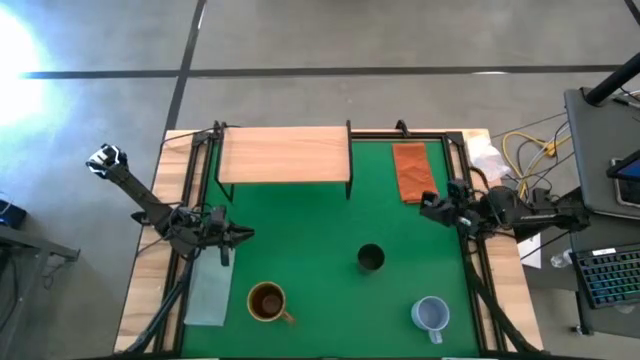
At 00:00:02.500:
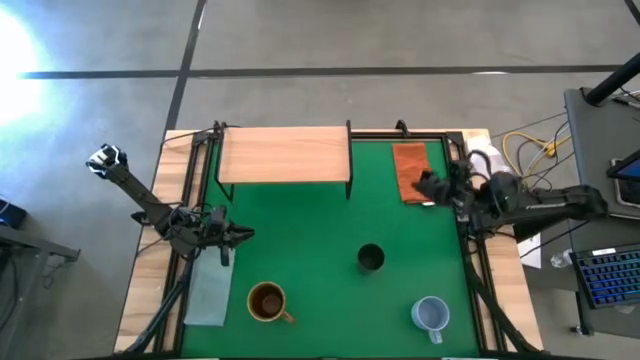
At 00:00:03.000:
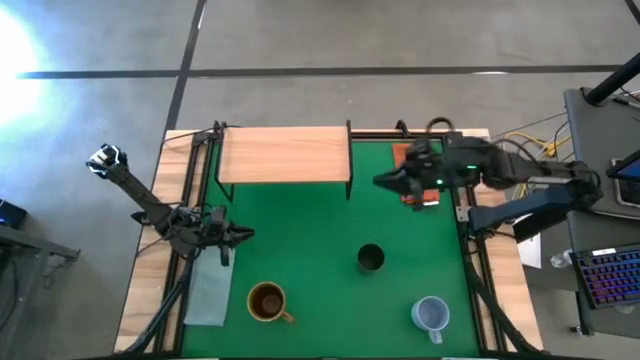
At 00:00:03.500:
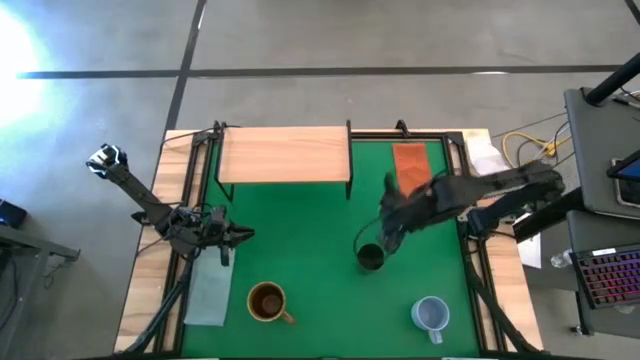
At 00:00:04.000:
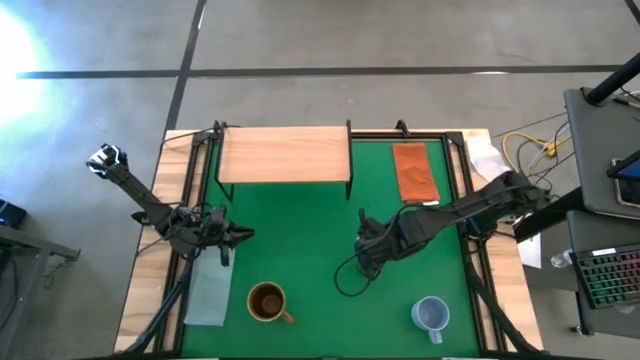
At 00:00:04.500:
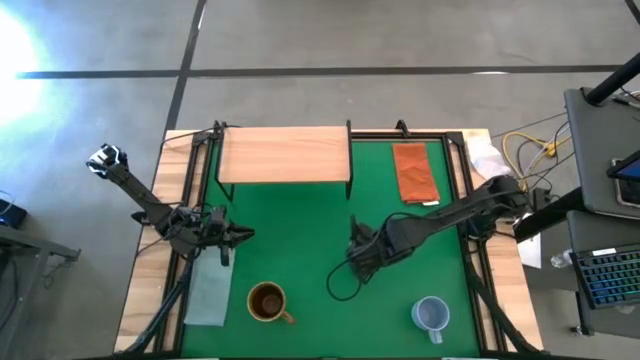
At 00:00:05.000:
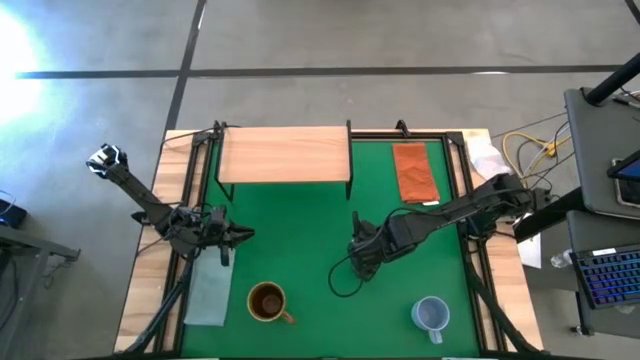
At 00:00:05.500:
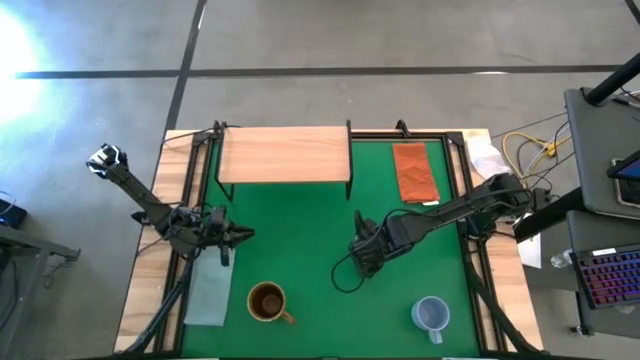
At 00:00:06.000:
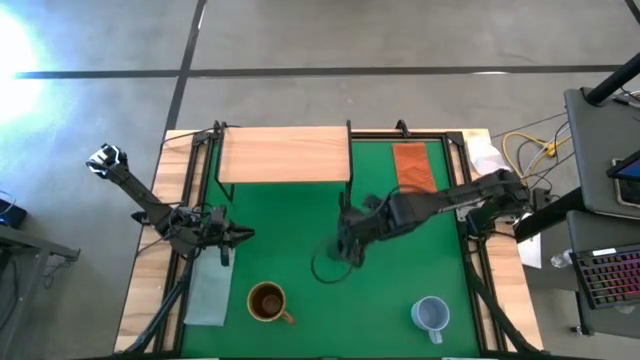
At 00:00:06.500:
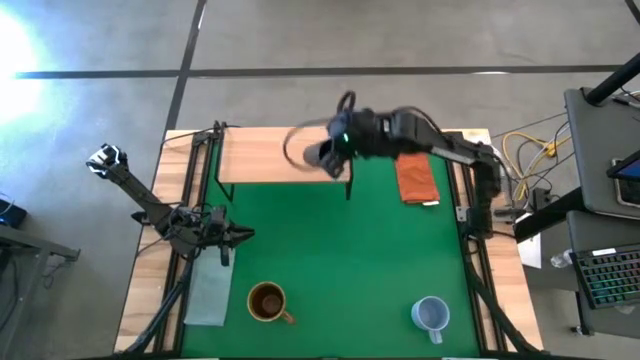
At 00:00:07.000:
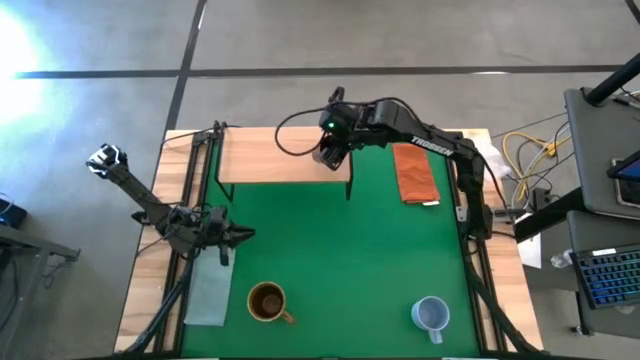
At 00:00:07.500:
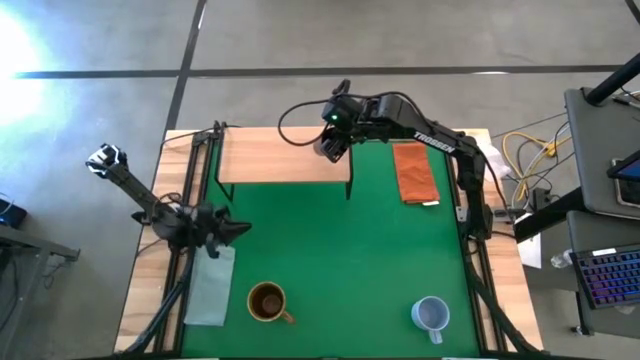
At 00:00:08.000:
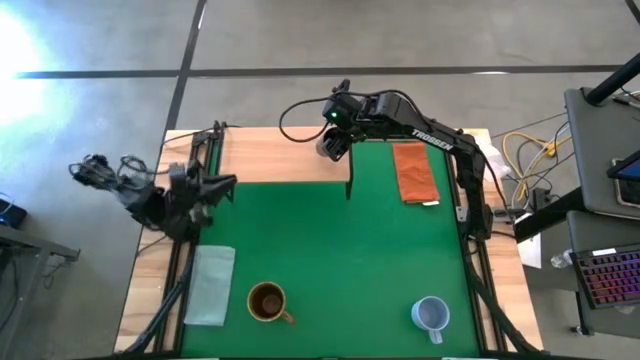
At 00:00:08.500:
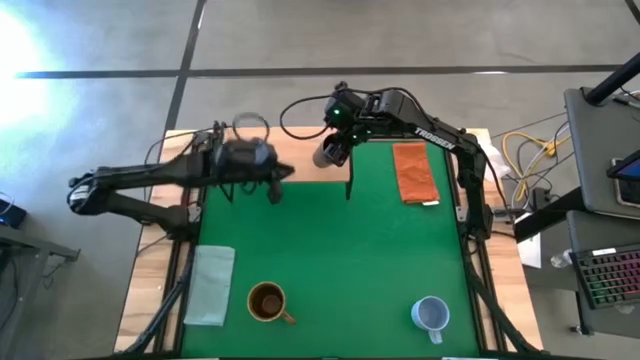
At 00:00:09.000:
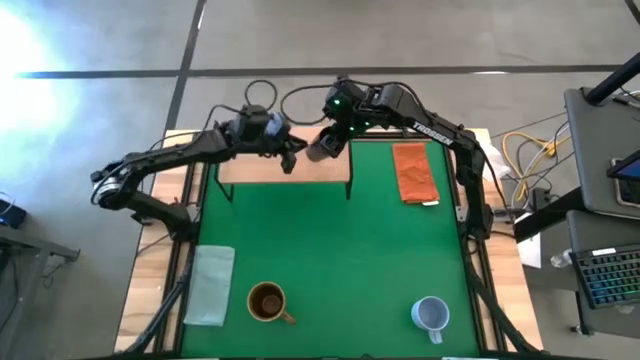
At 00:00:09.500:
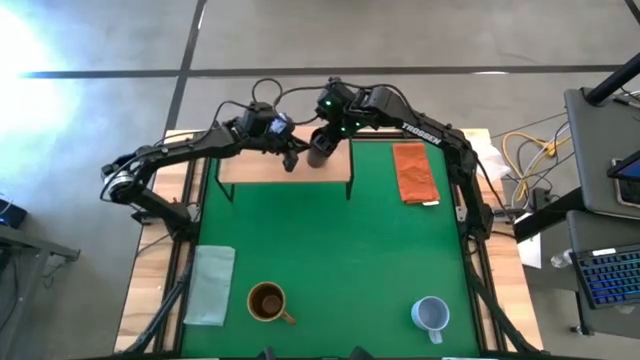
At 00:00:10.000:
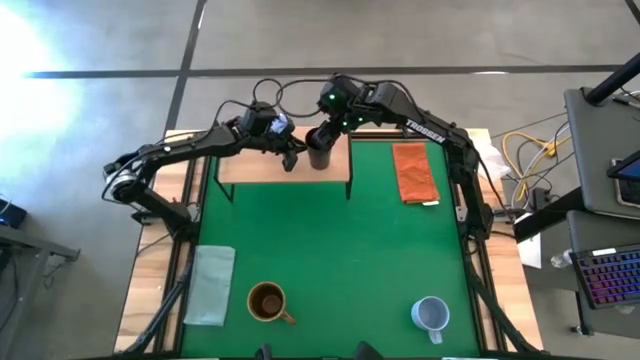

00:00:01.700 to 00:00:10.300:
Task: Stack small to large cups/mugs on shelf
Put the black cup on the shelf

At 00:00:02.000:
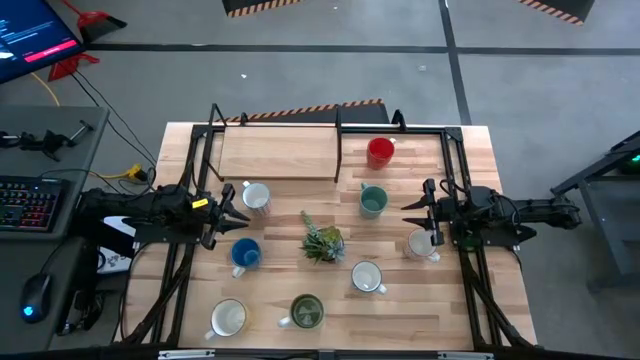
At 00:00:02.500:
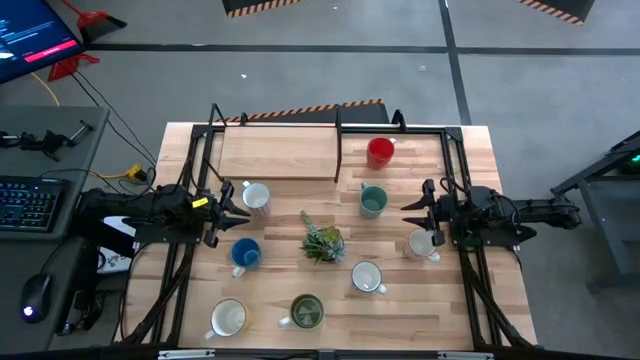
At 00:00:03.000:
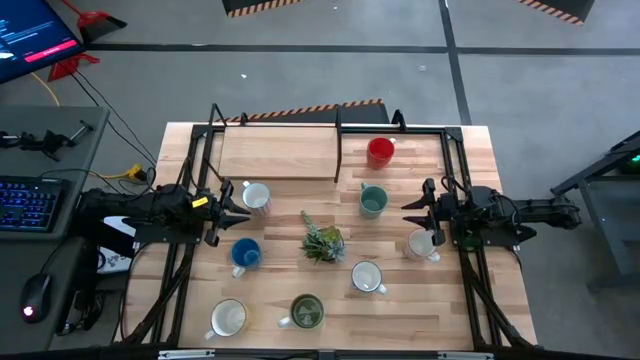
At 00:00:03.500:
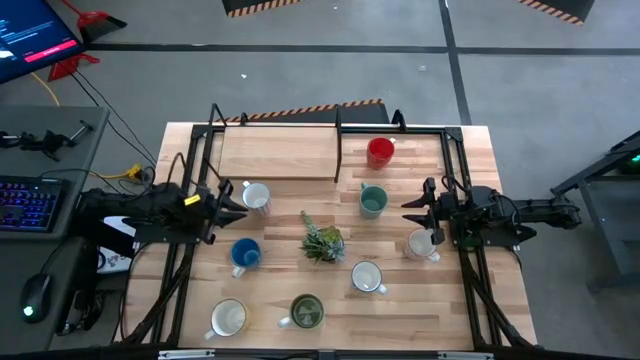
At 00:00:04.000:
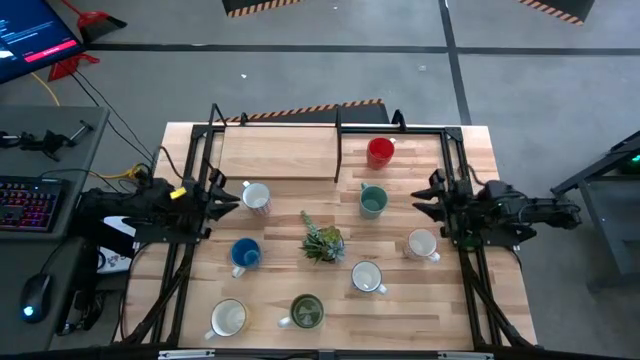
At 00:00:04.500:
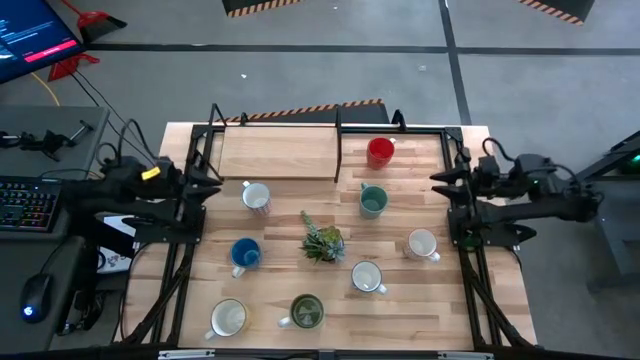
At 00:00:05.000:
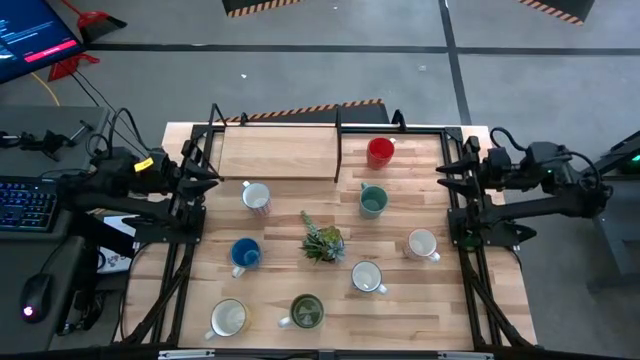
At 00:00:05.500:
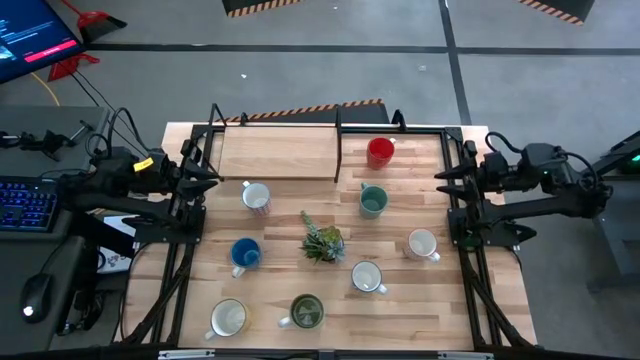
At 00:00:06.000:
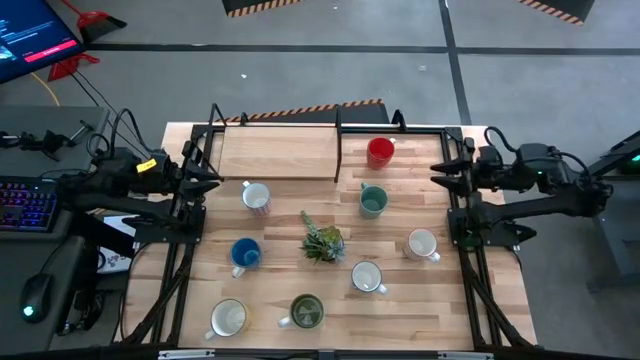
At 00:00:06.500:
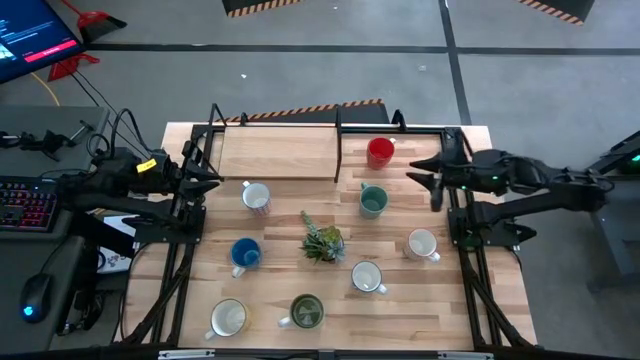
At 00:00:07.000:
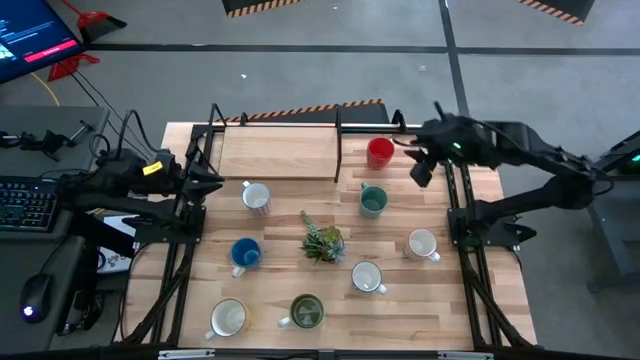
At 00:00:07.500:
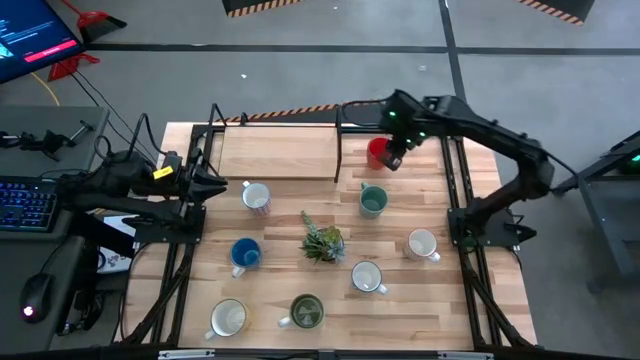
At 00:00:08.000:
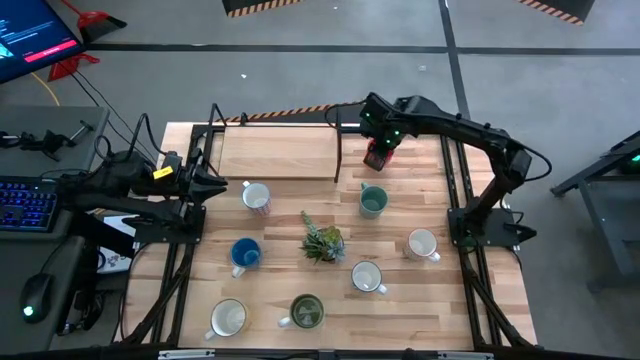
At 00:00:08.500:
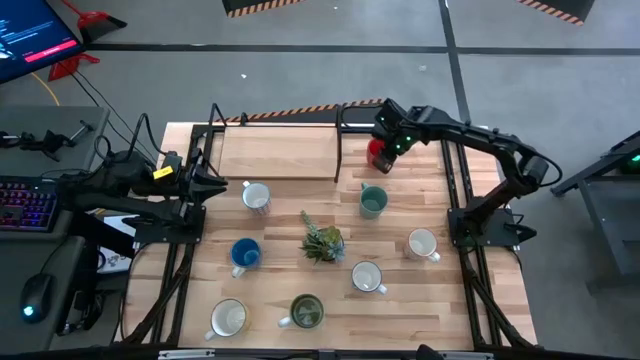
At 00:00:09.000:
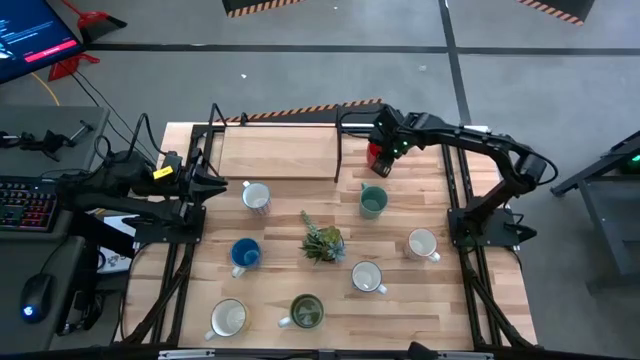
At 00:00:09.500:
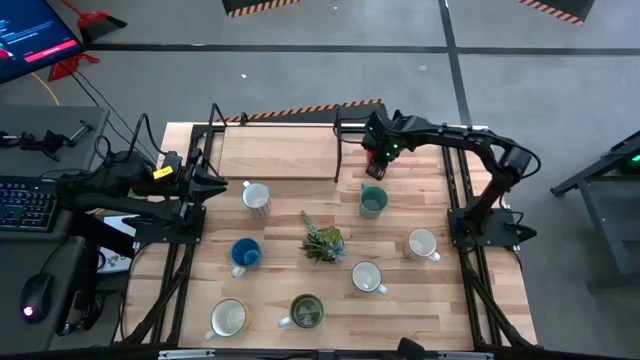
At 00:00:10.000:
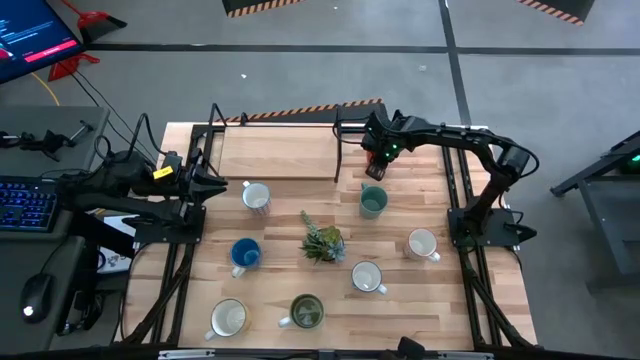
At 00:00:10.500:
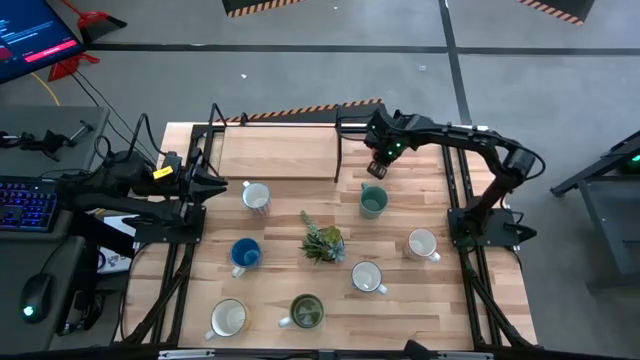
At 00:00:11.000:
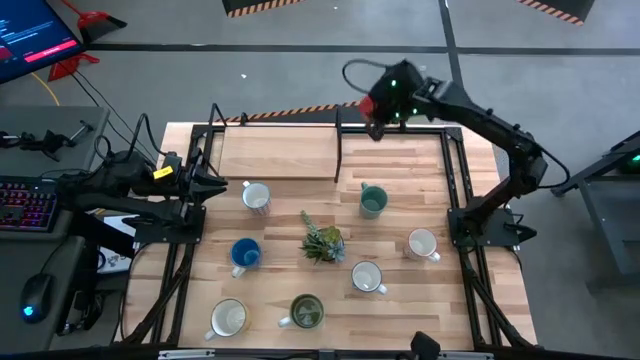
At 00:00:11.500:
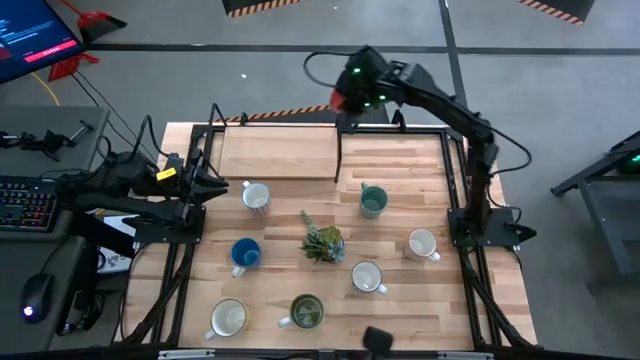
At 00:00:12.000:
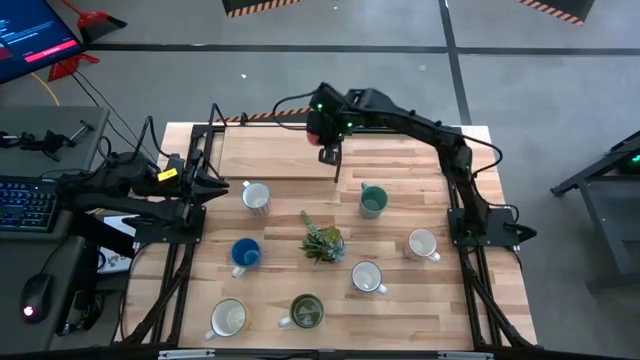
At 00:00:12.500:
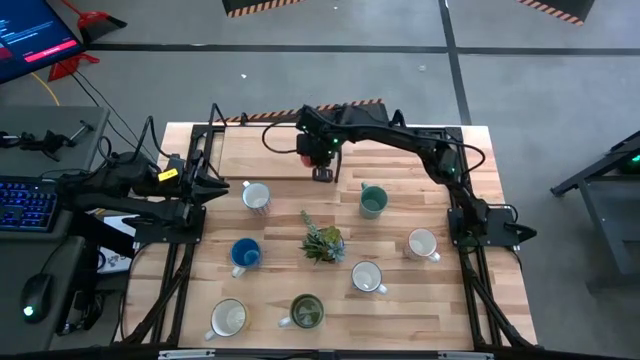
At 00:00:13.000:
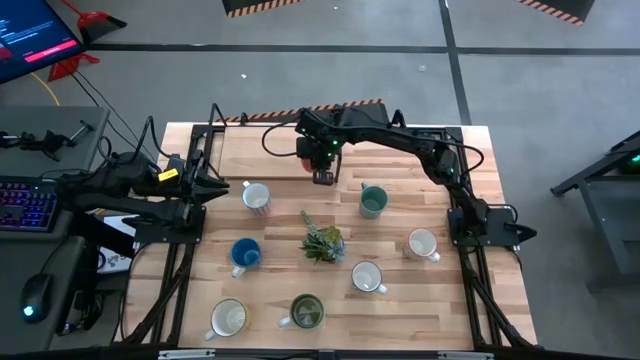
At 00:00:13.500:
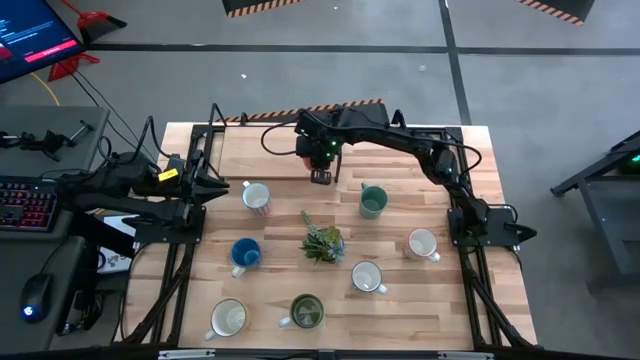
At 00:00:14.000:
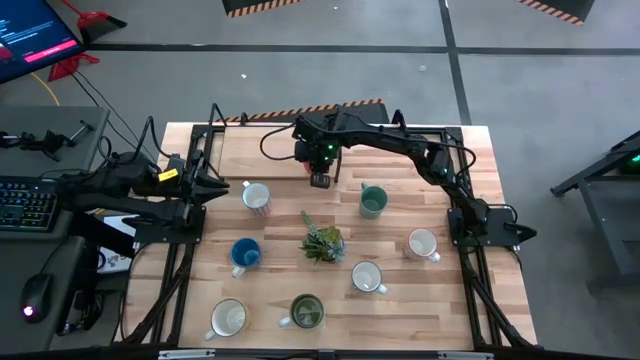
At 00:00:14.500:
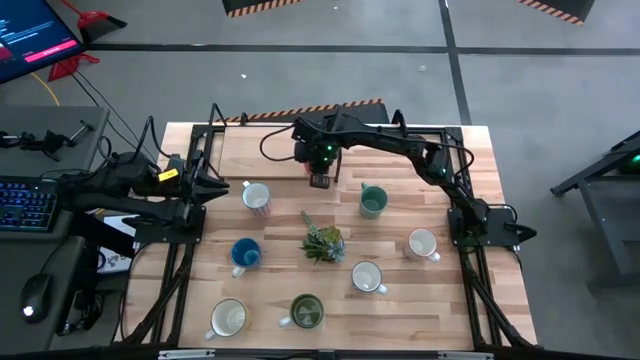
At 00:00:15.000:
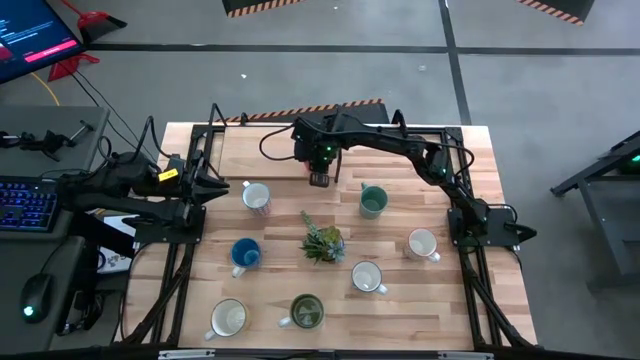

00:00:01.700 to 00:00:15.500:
Task: Place coffee mugs
Put the orange mug on the shelf
